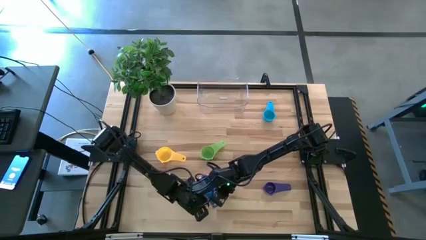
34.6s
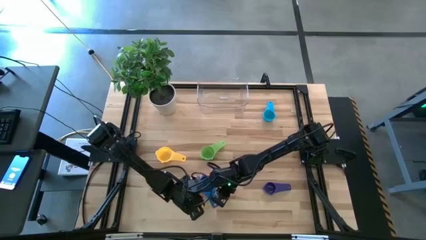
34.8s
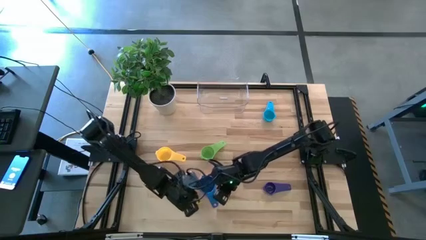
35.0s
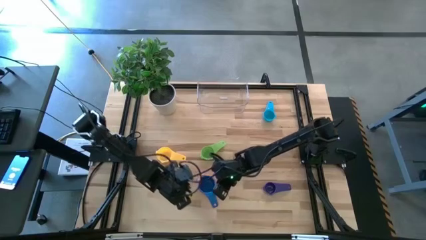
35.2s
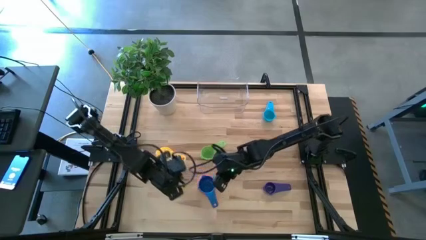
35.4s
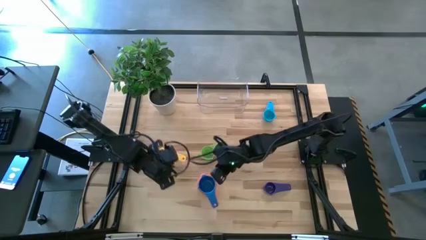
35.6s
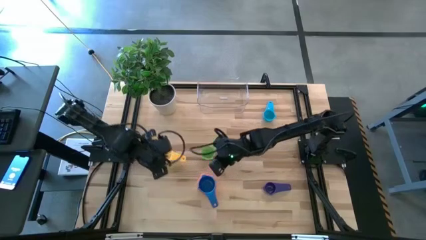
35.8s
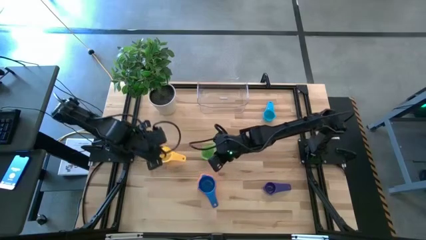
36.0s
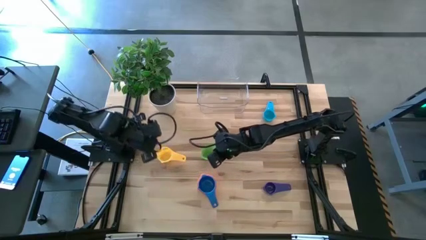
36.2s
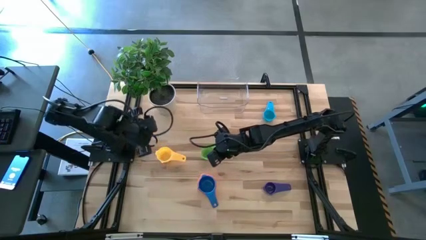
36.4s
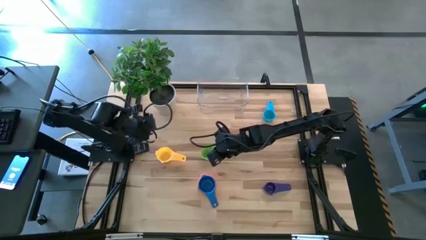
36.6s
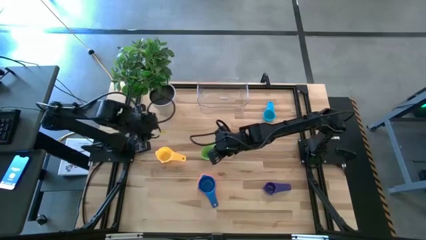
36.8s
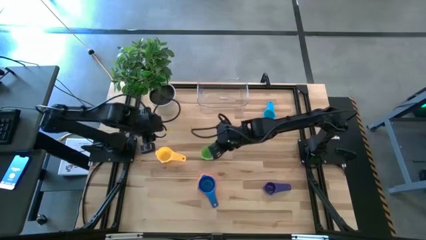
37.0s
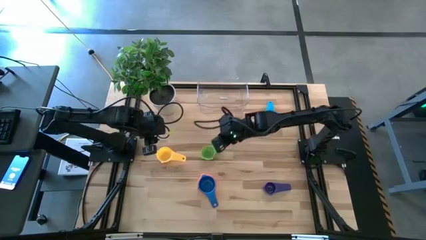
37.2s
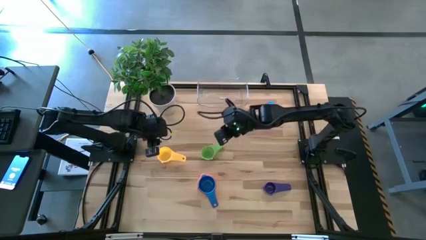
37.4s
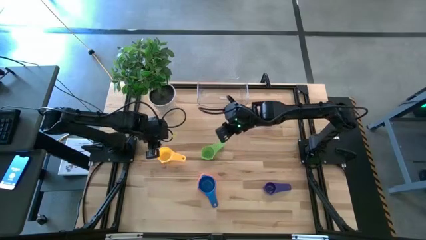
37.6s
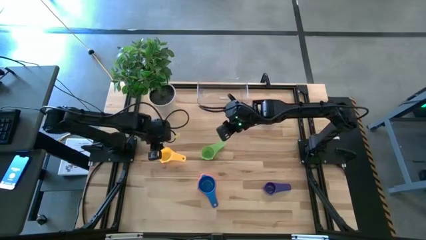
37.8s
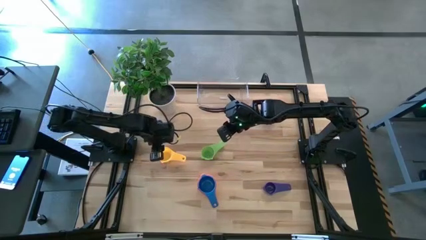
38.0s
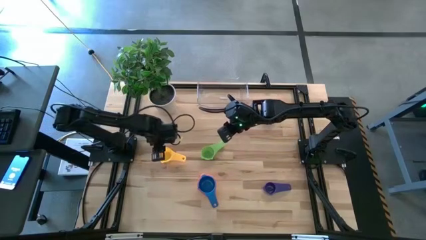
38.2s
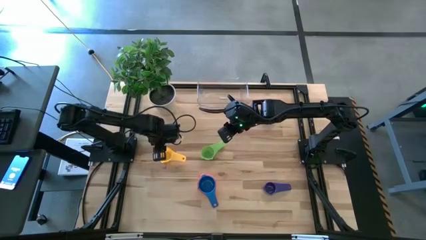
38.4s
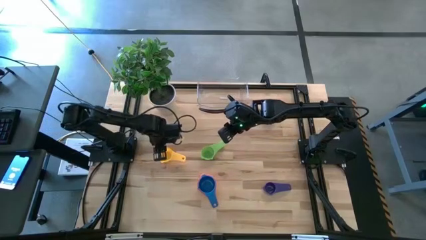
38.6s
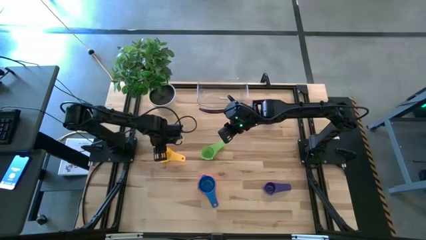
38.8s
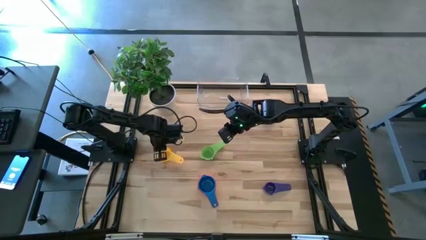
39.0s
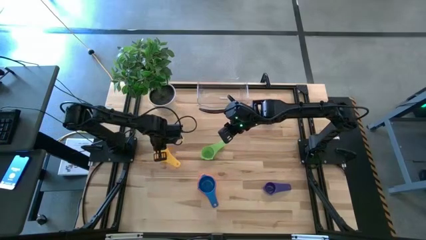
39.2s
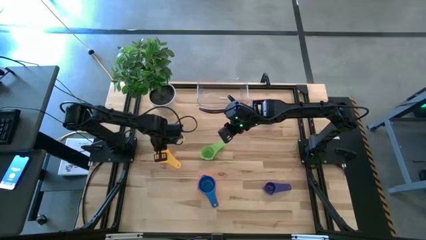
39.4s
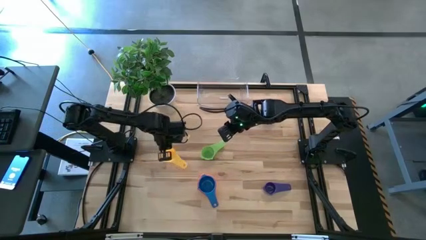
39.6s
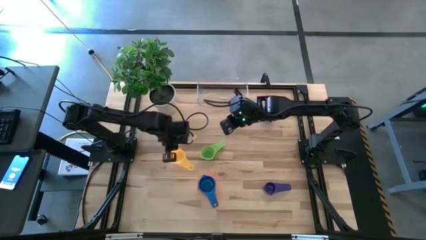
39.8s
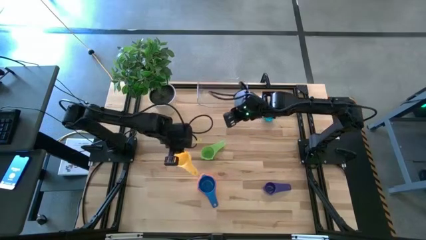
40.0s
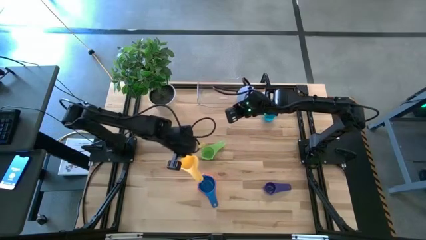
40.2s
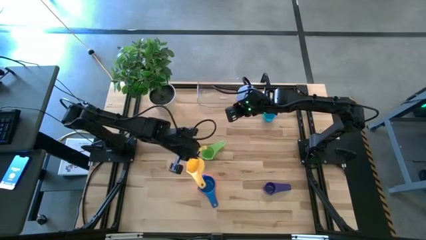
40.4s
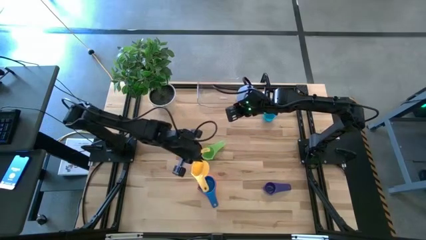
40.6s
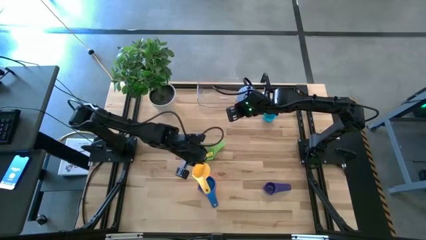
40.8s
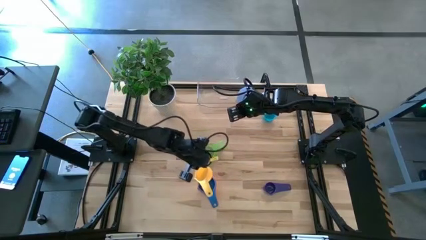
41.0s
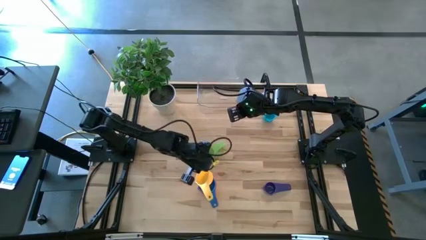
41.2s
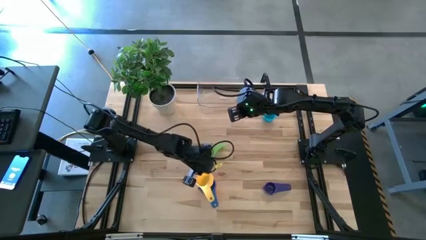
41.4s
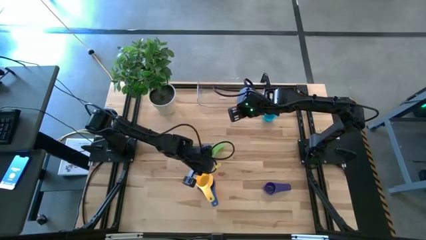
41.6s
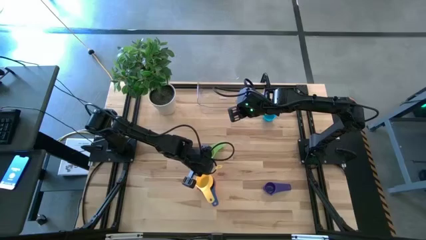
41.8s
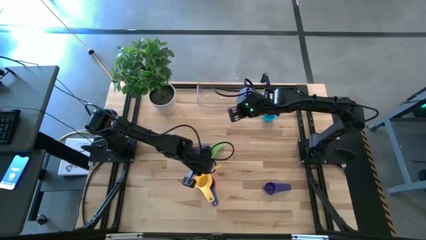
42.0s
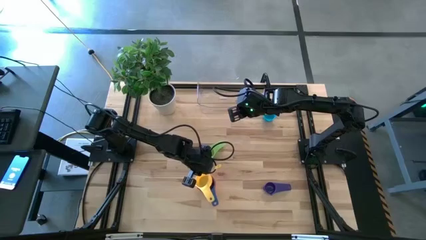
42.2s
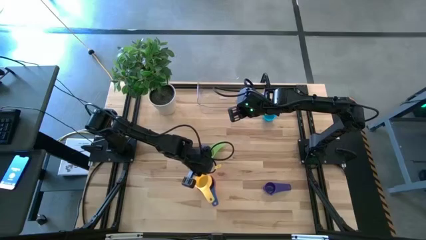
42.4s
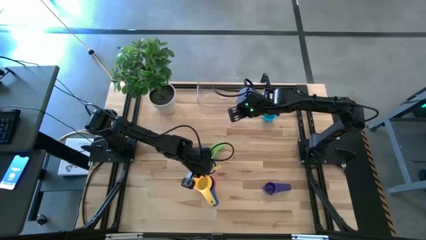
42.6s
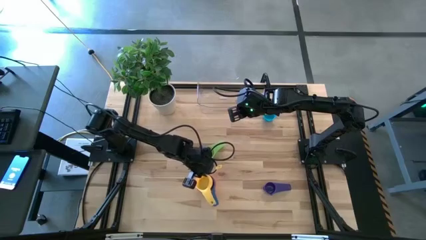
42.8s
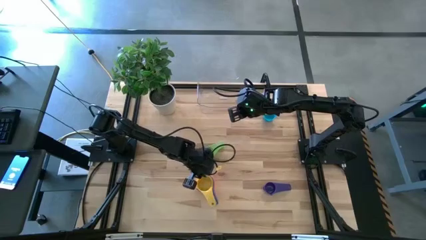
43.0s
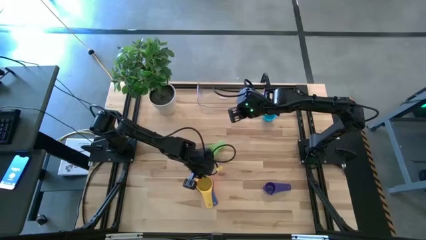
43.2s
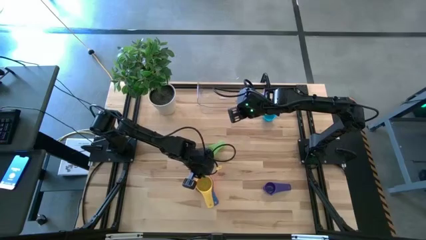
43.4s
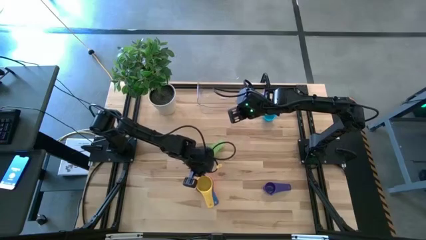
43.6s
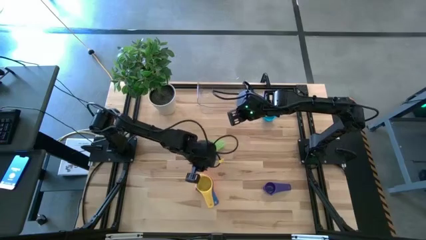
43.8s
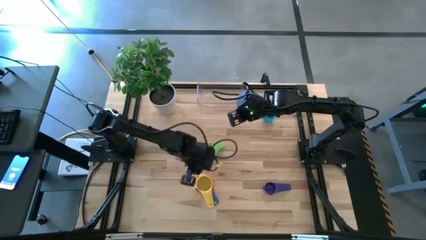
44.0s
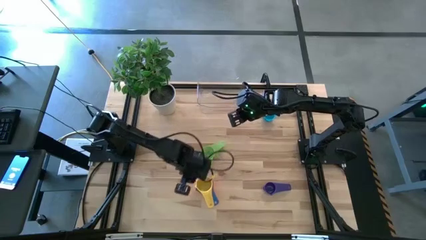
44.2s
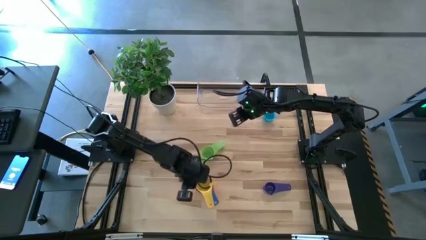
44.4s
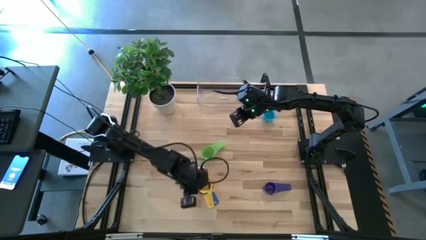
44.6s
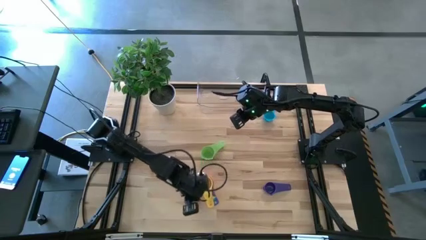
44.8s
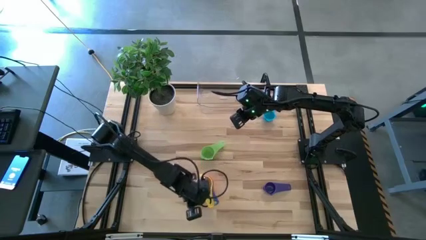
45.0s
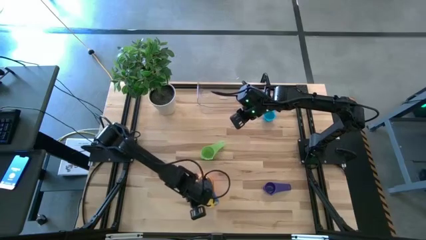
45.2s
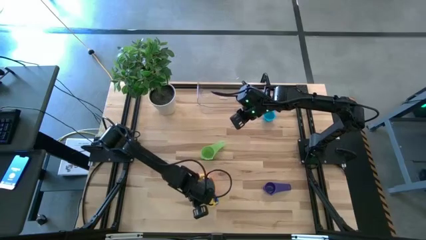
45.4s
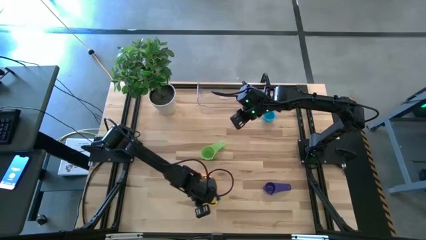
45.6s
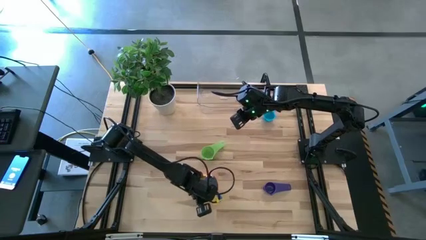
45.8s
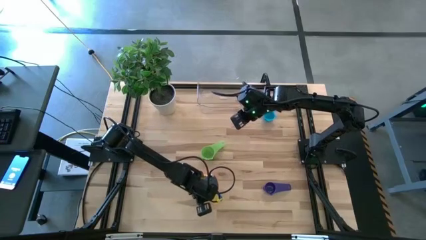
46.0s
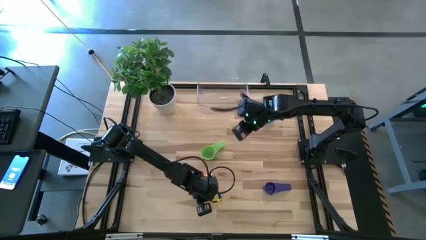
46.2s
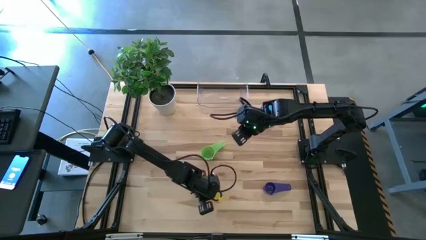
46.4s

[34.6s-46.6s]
Task: Nest measuring cups in basket
Stack the yellow measuring cup on top of the blue measuring cup

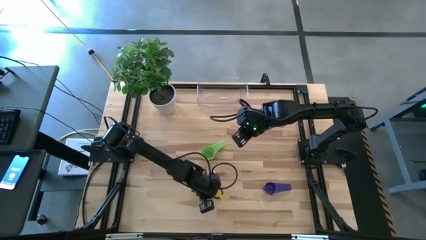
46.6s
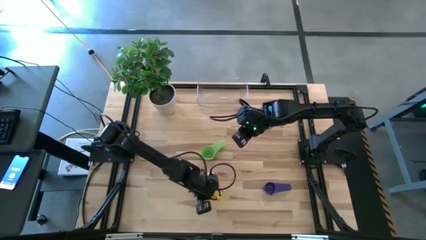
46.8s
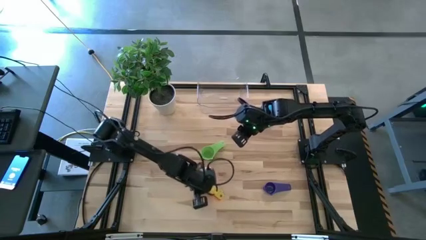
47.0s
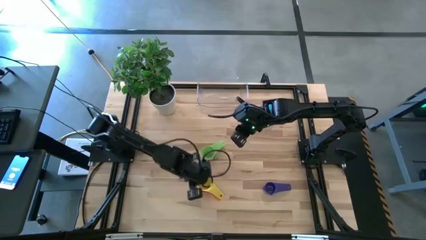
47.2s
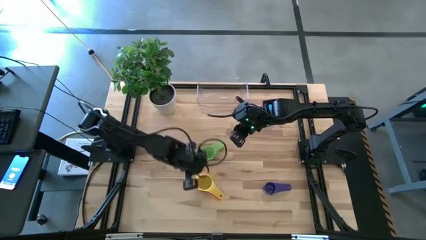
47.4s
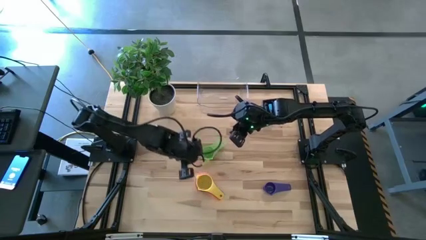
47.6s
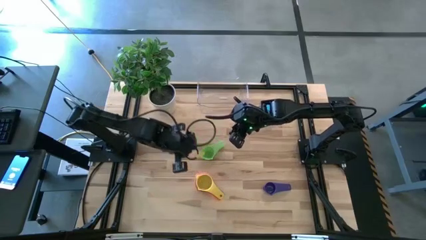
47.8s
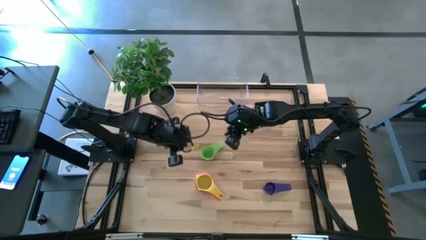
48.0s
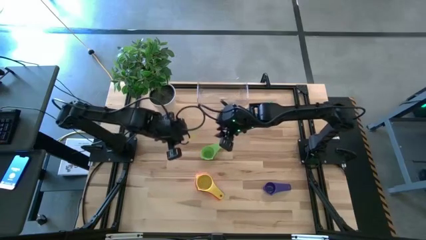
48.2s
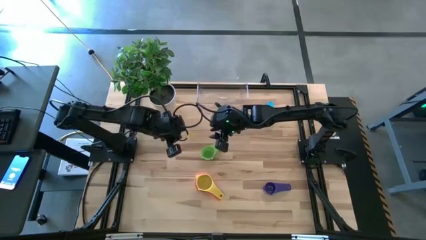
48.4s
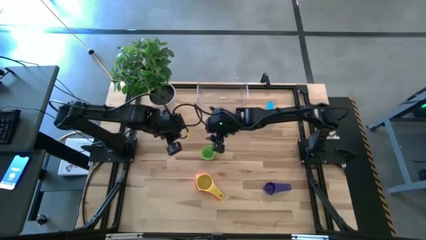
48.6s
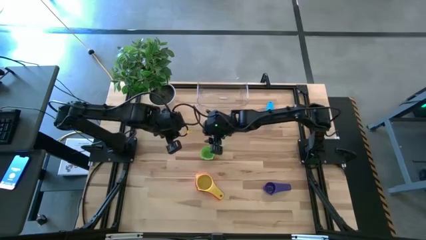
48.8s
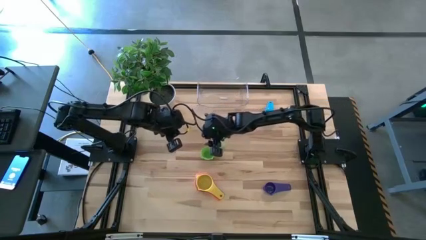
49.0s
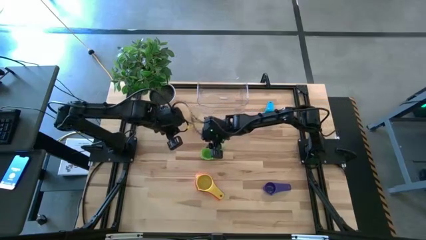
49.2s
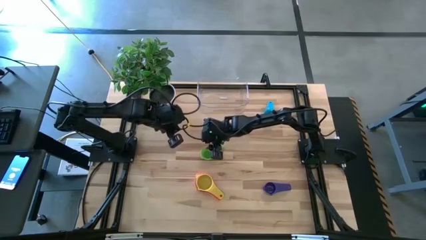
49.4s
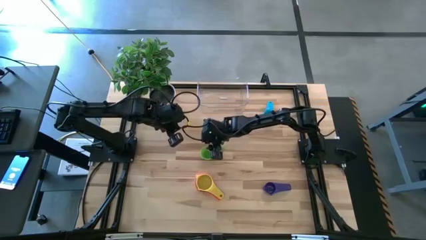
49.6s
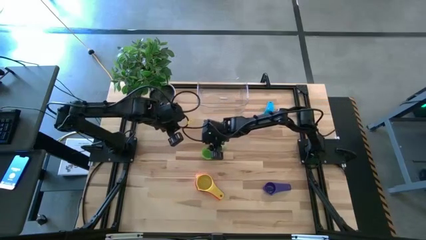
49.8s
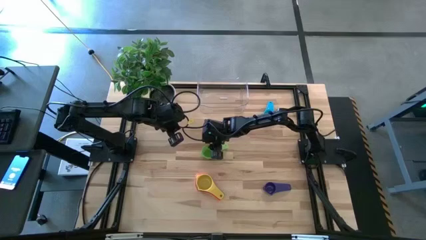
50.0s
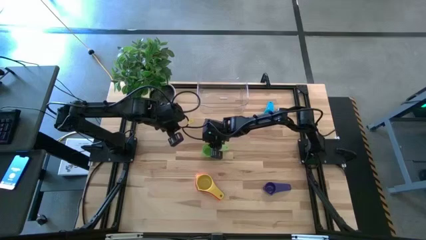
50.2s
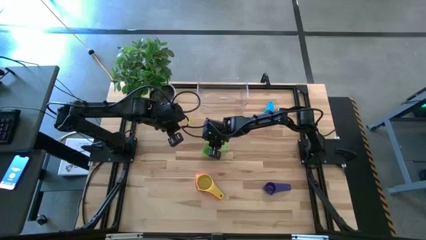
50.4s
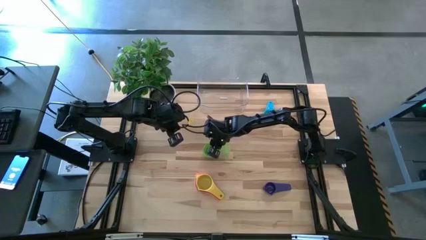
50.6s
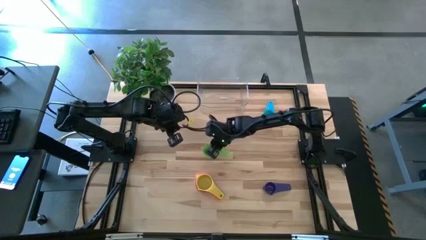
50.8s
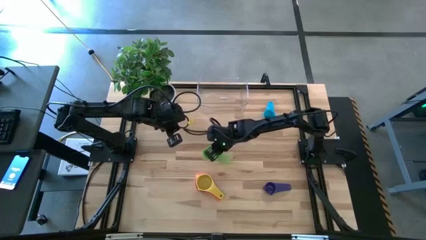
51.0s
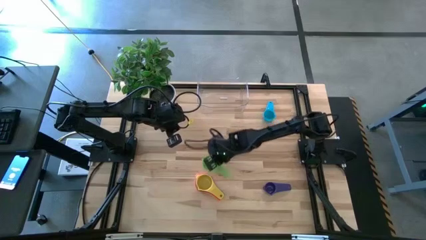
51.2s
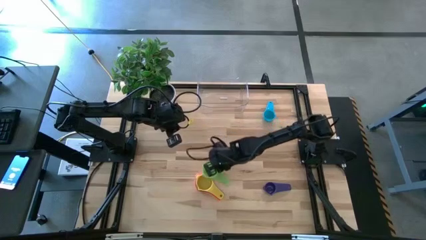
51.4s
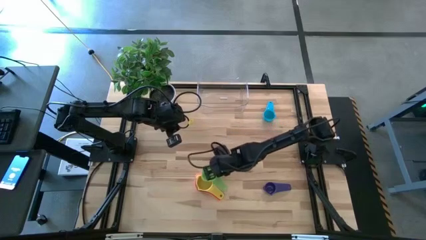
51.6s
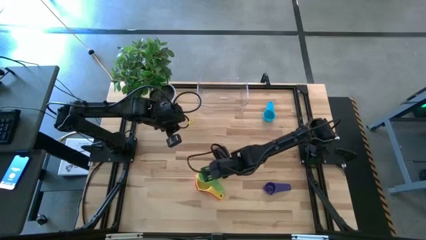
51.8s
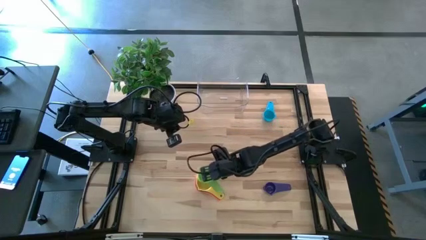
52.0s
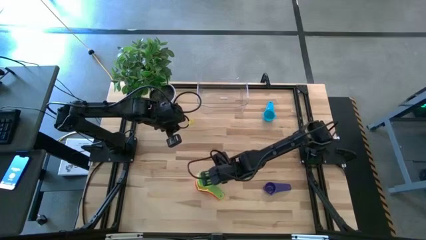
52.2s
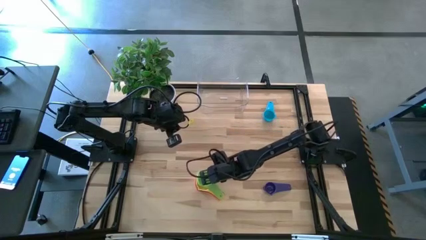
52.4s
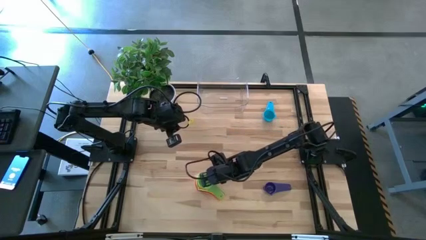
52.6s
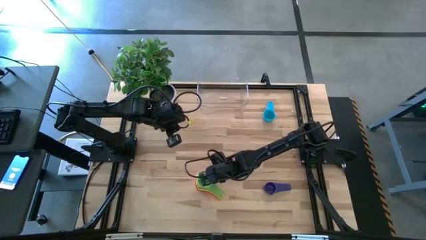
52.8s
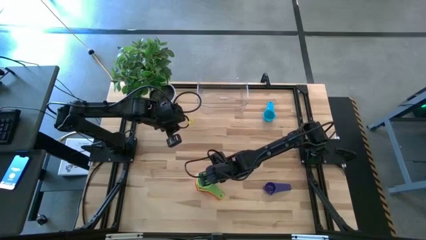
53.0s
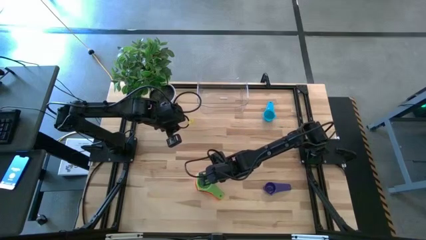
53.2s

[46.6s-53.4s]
Stack the green measuring cup on top of the yellow measuring cup
